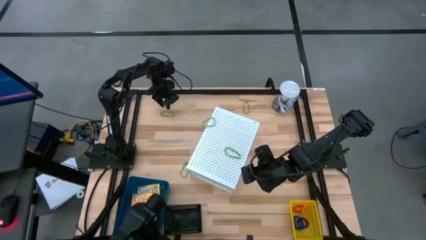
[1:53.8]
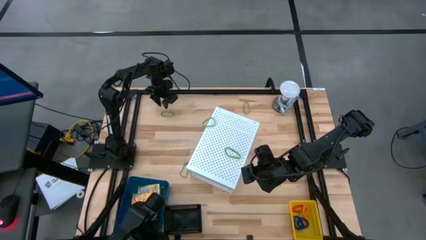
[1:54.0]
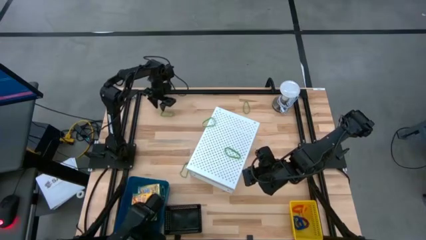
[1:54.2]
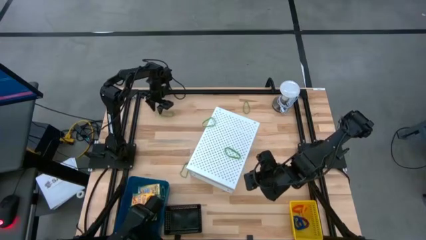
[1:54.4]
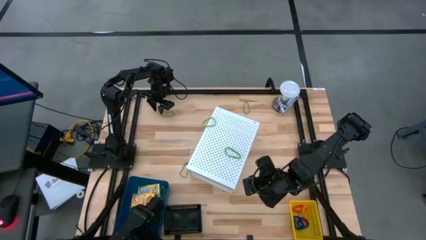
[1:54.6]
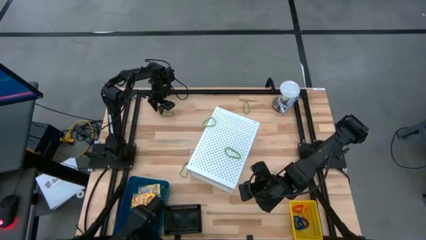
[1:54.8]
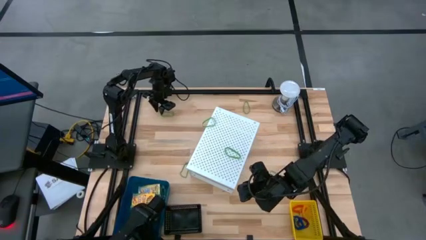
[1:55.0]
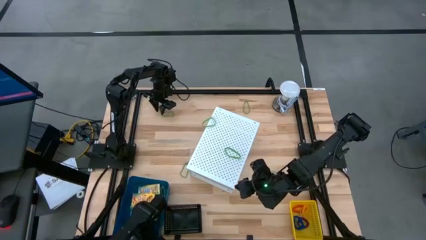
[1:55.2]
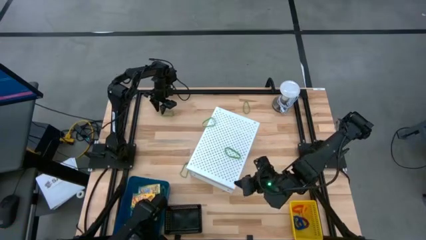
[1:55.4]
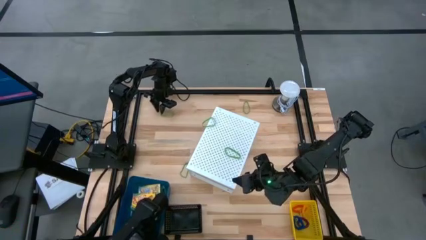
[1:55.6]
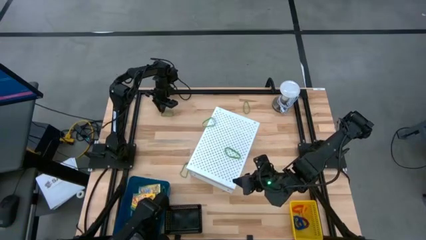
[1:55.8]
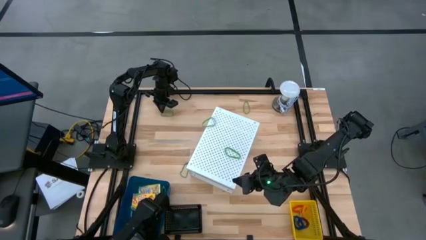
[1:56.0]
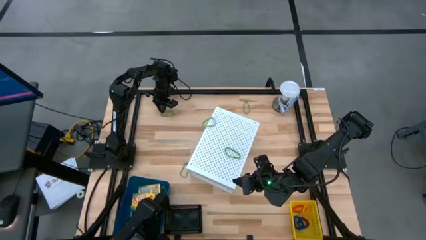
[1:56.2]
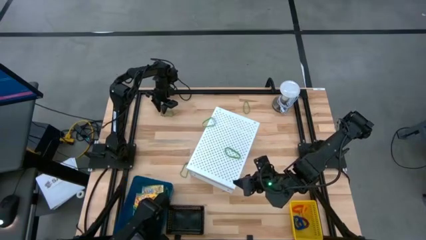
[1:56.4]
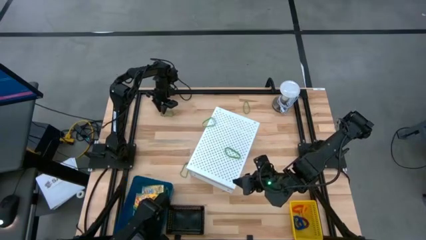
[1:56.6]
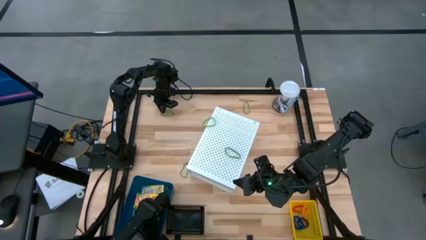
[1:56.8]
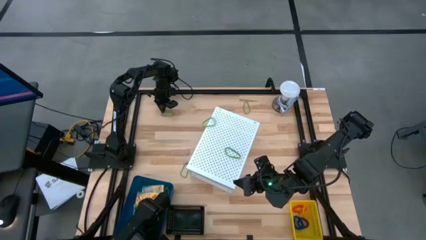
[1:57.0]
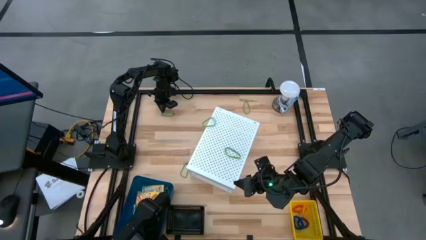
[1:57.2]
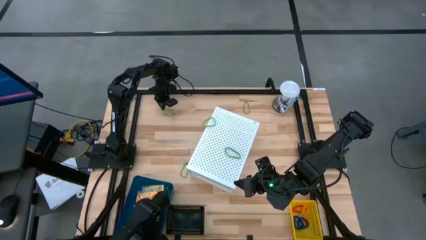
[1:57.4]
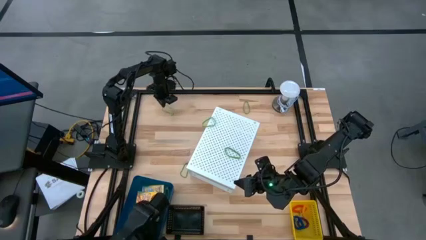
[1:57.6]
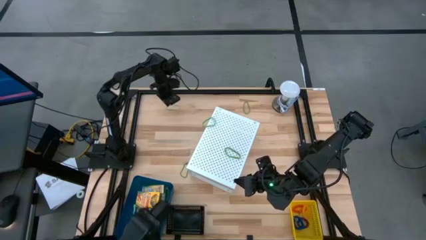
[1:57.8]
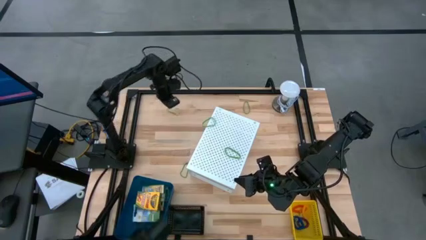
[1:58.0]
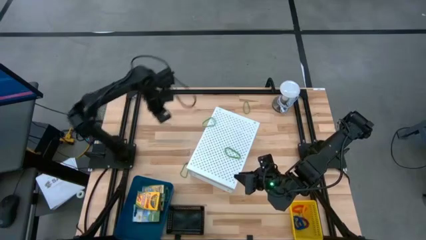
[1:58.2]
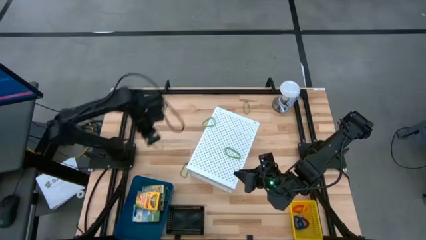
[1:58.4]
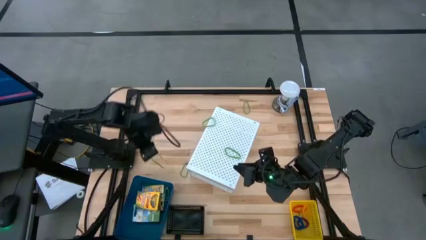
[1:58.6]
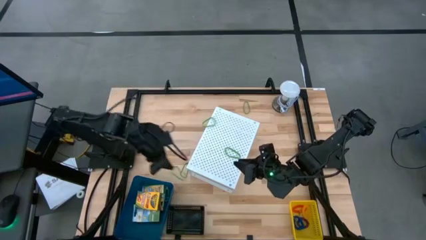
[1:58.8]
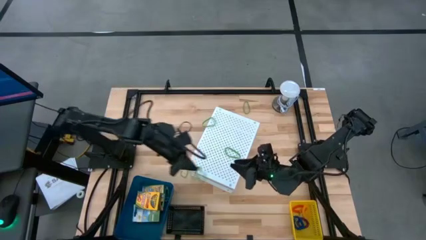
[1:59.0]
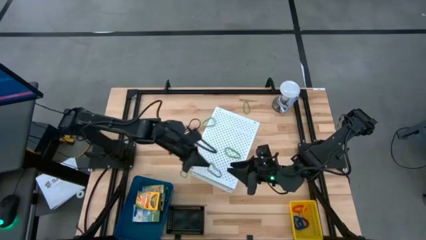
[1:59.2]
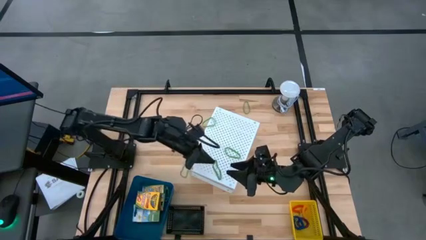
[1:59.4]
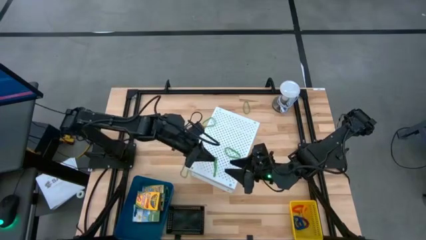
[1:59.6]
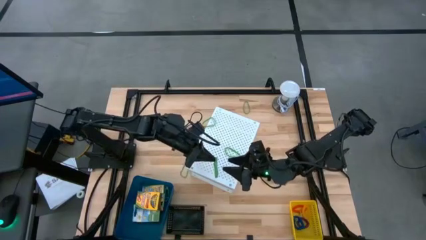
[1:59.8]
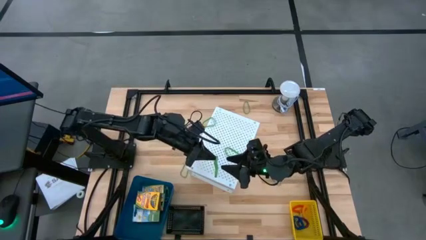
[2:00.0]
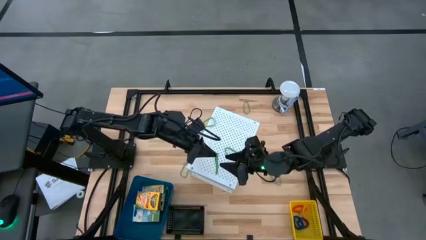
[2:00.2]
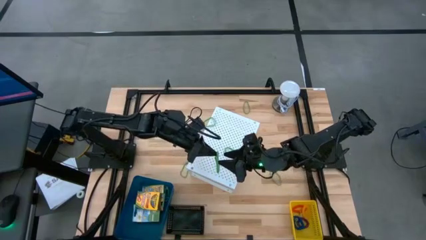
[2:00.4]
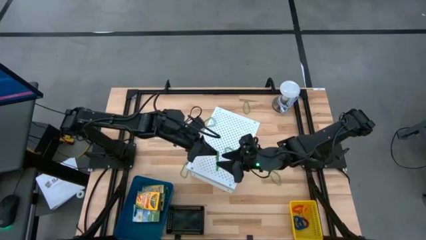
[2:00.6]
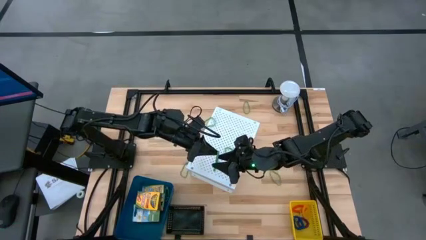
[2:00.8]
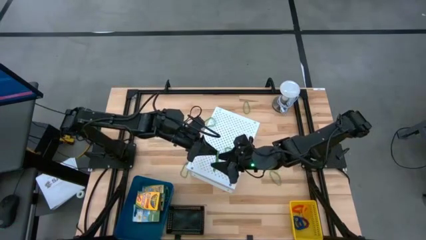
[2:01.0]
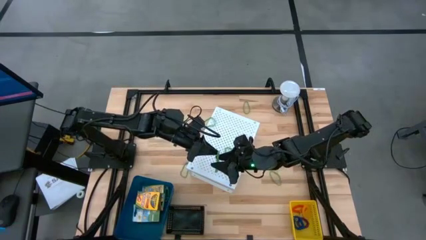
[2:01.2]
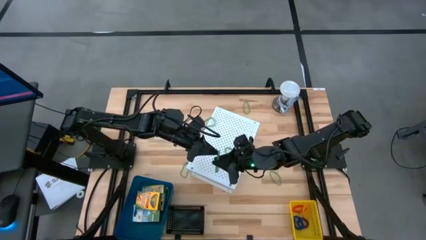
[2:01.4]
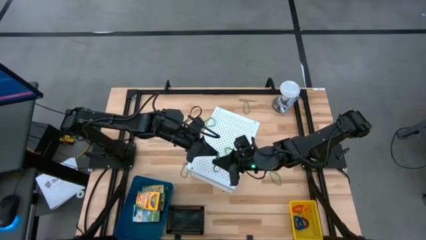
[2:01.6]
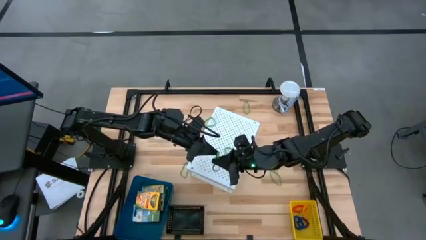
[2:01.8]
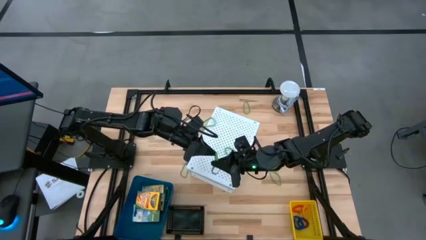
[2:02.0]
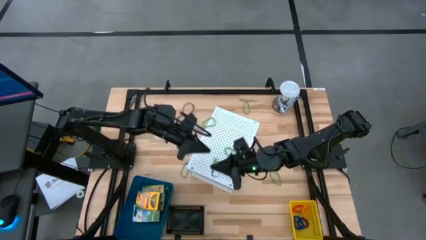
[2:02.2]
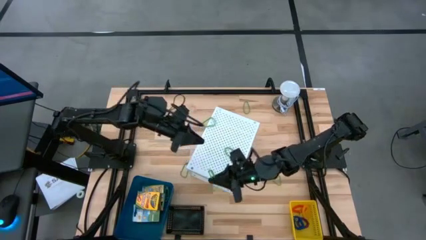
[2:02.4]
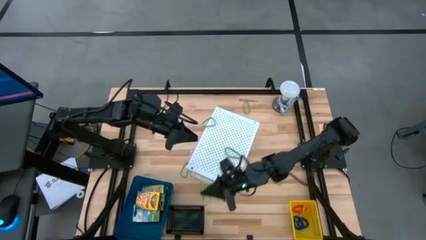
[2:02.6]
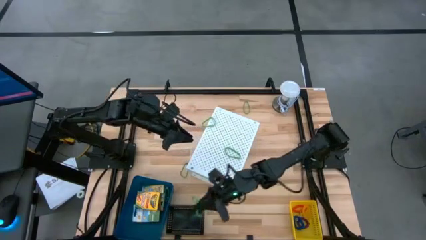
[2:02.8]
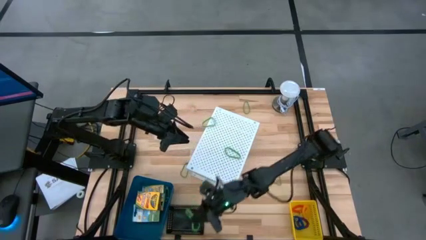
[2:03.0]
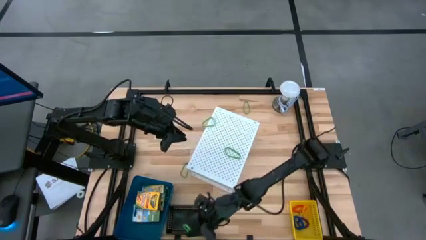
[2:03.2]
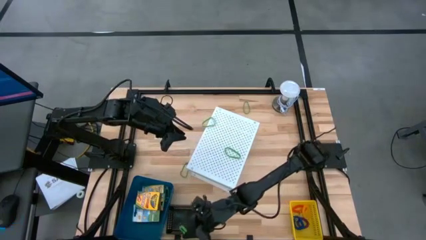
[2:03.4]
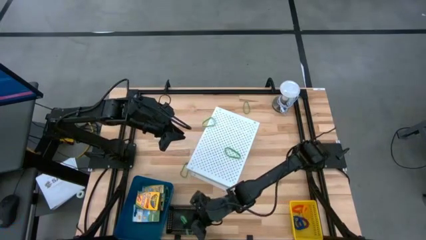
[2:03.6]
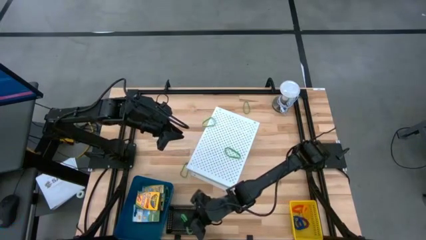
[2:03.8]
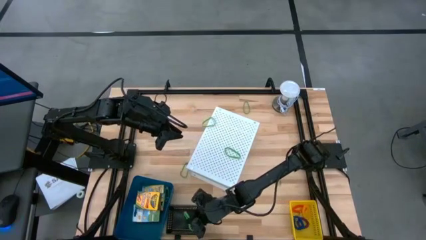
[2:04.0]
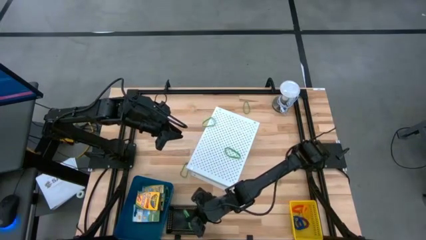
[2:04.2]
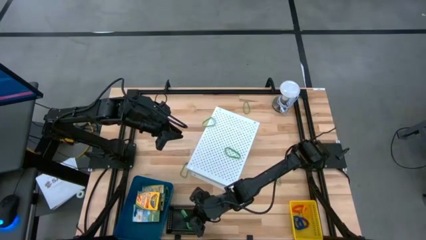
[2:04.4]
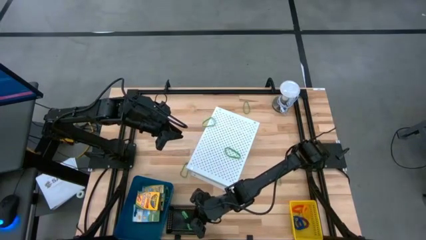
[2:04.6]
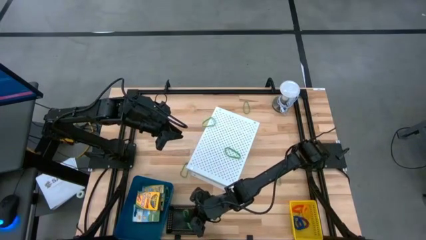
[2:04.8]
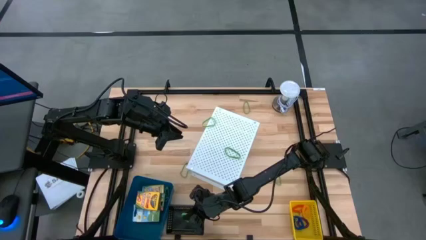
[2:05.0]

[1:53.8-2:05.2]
Task: Pick & Place Office Desk Supplies
Put the green rubber band into the black bin
